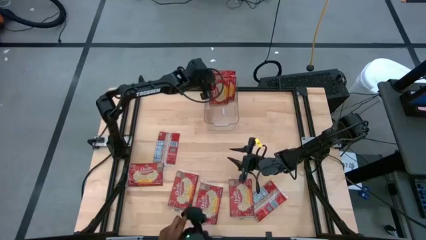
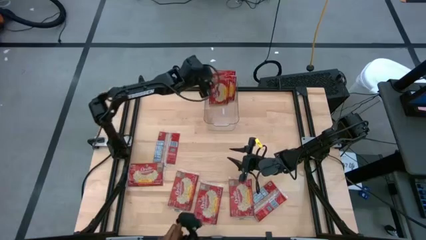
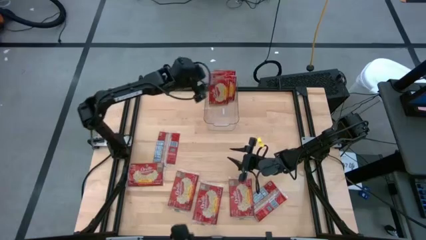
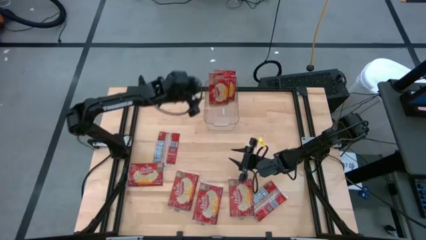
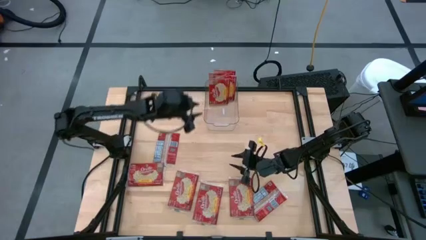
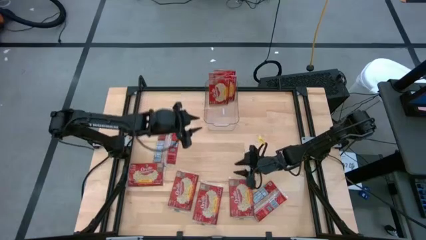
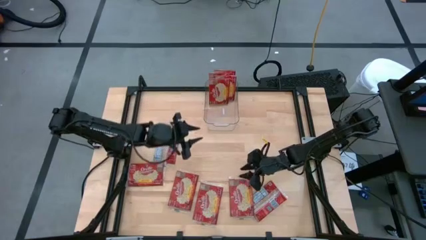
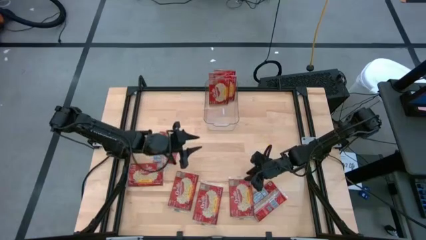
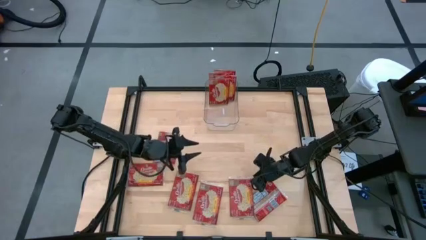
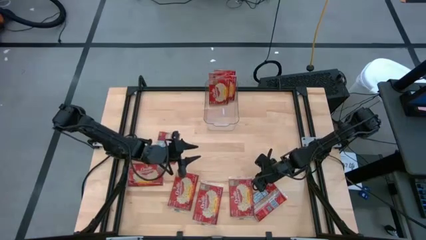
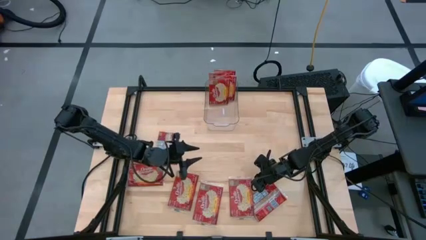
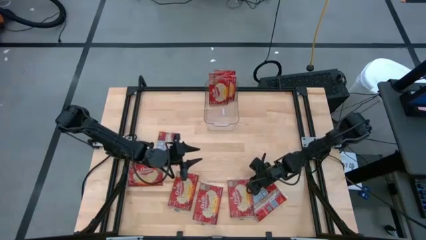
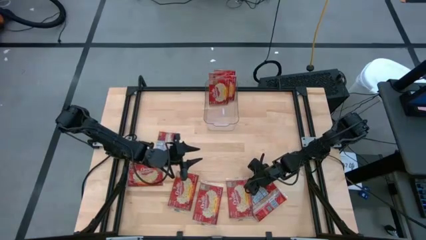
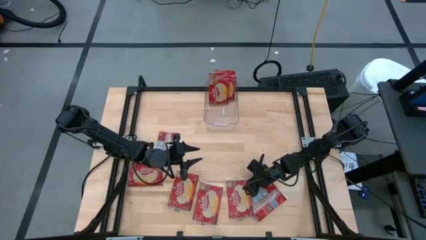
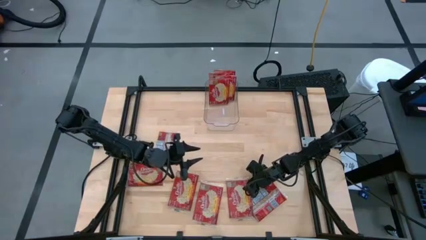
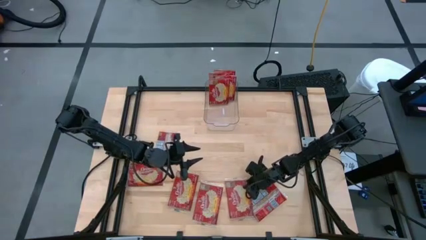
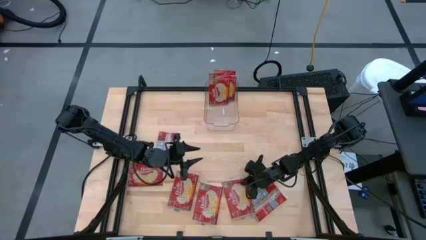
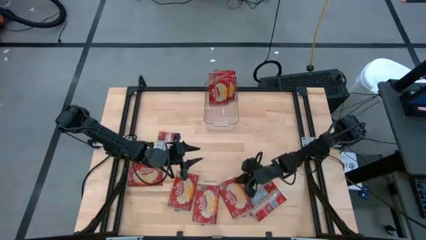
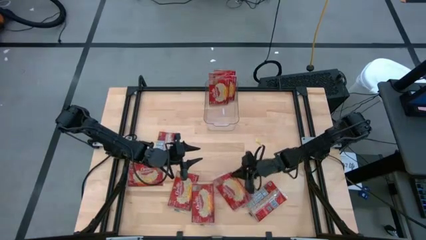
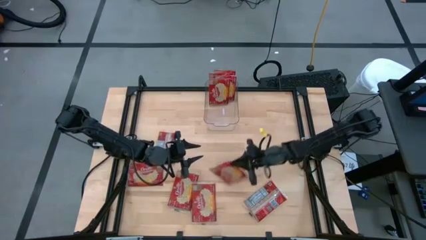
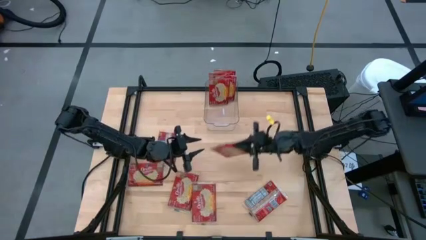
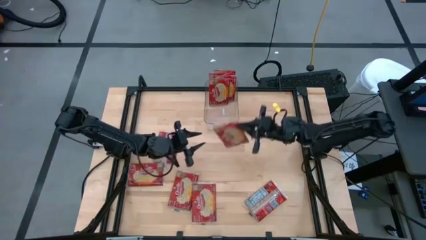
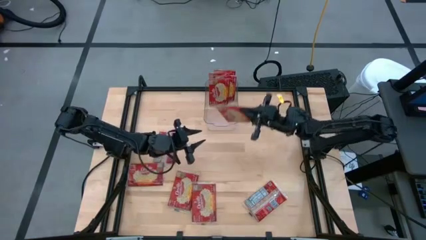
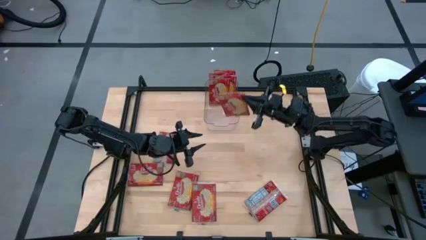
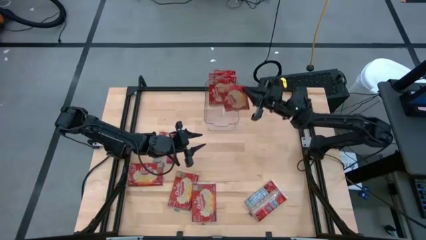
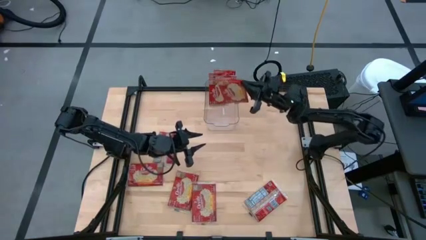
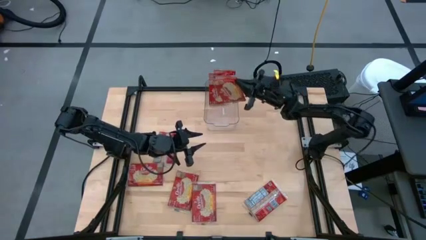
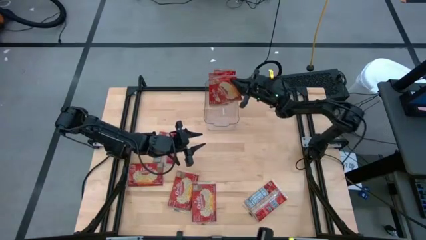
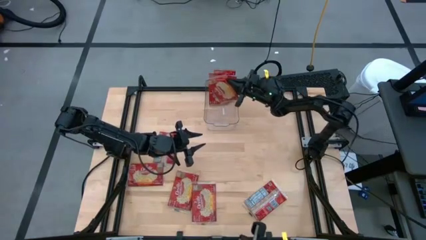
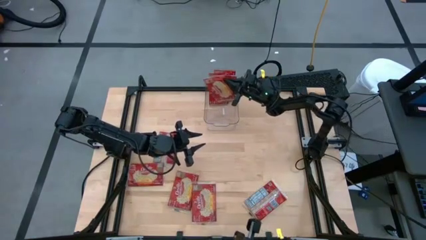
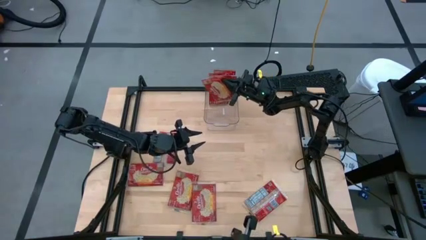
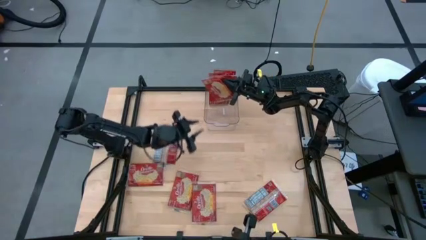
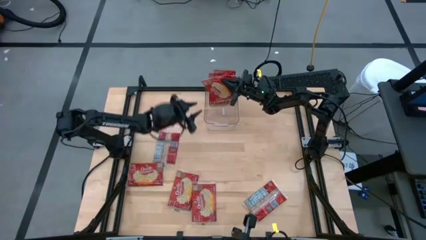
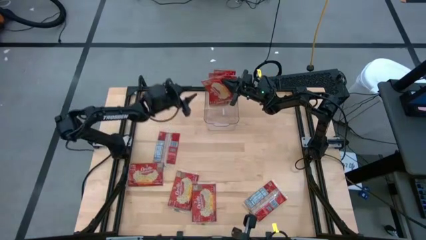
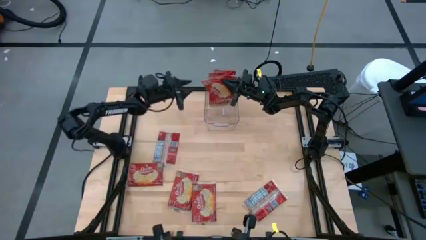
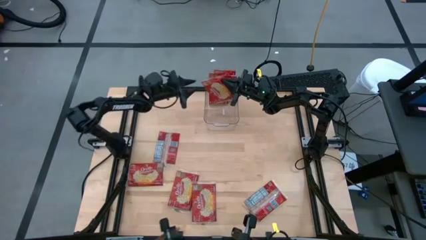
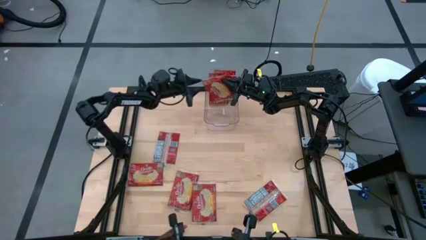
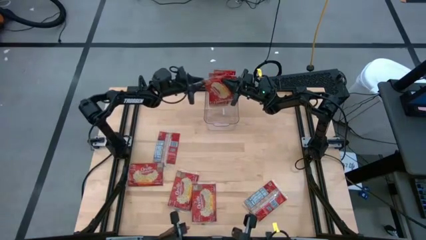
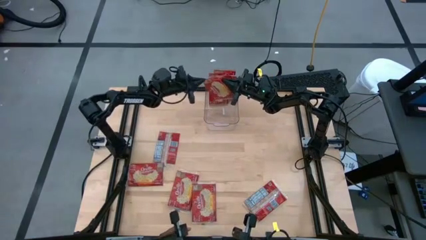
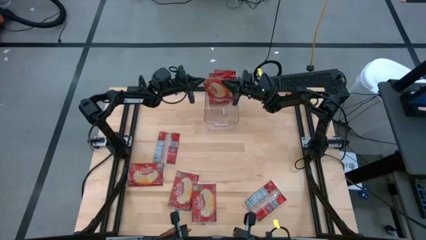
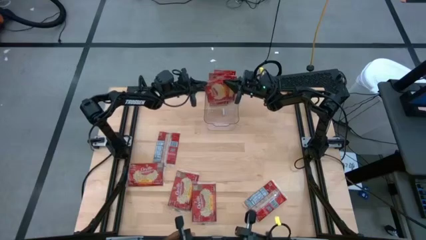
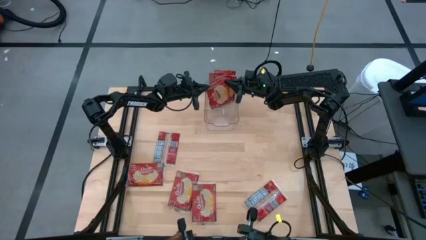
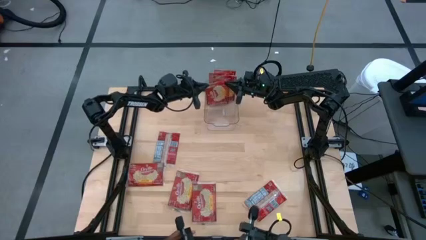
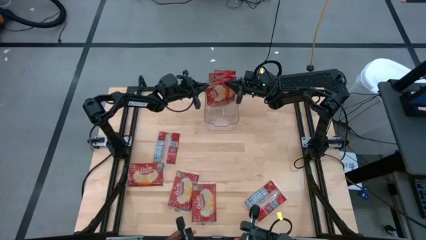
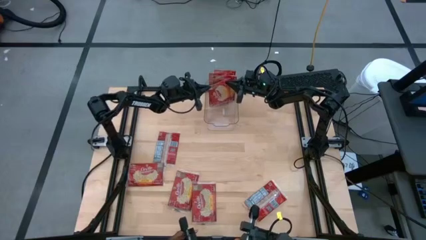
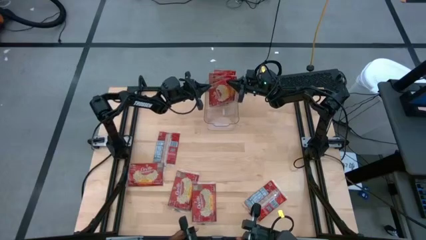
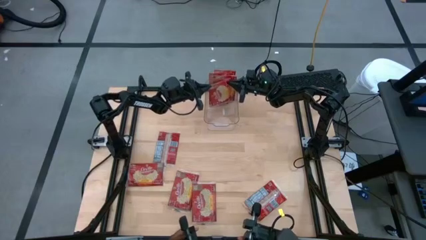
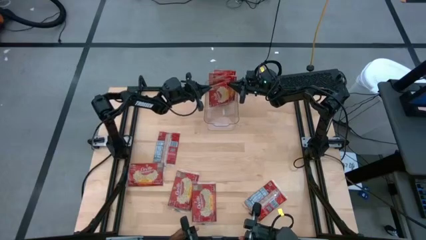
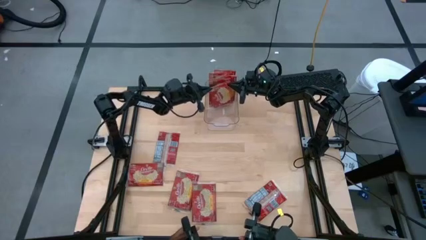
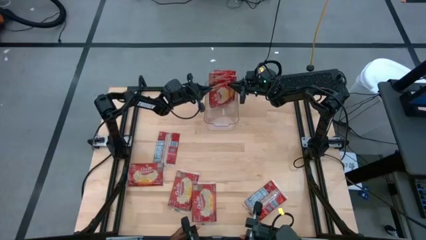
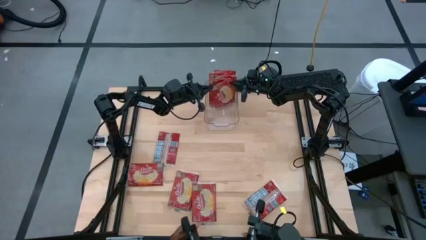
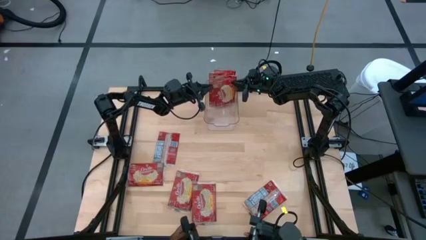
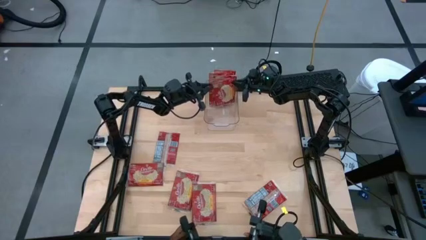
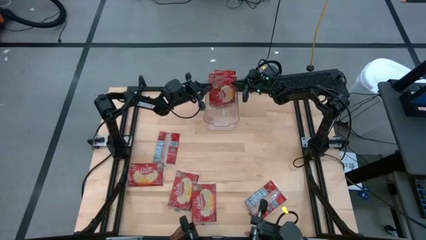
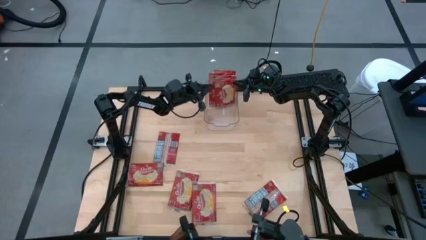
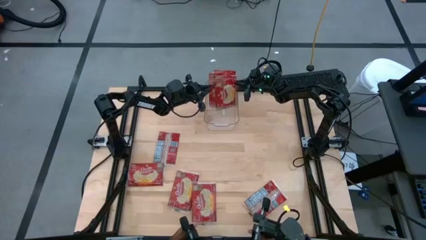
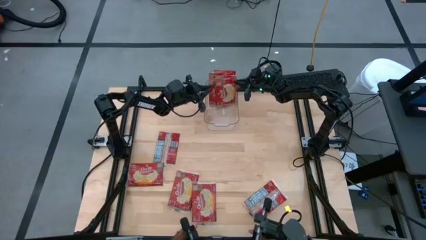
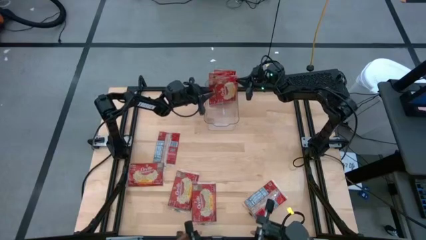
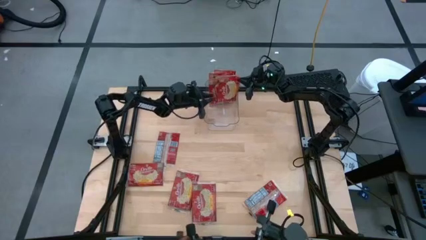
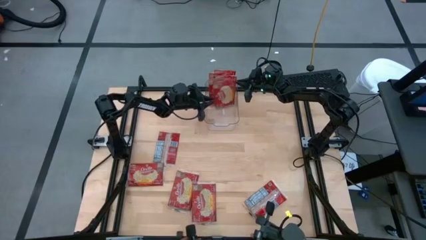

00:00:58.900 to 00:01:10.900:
Task: Sort popcorn bags into baskets
Put the red popcorn pack into the transparent bin
